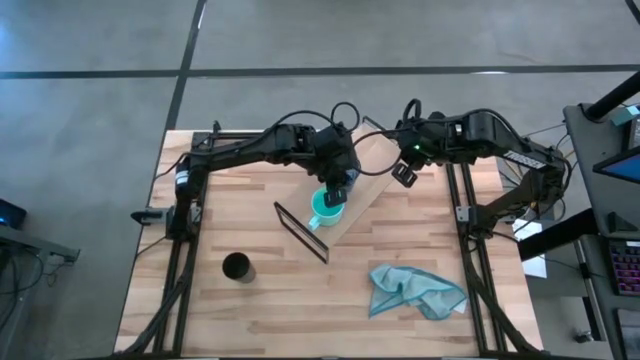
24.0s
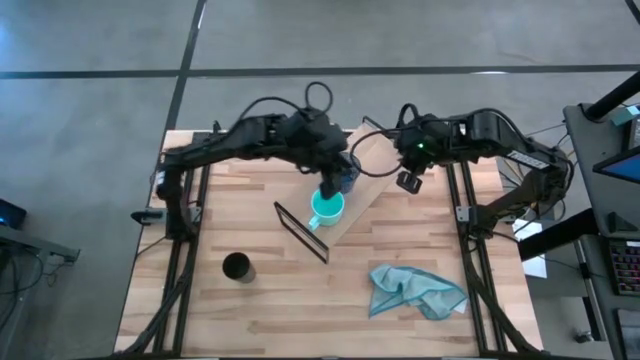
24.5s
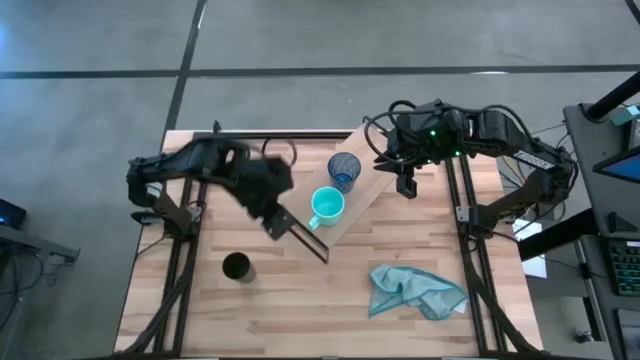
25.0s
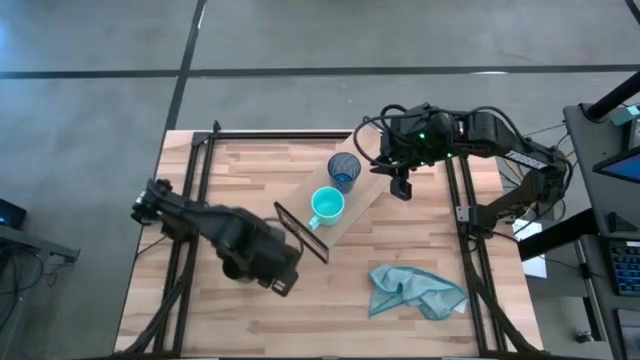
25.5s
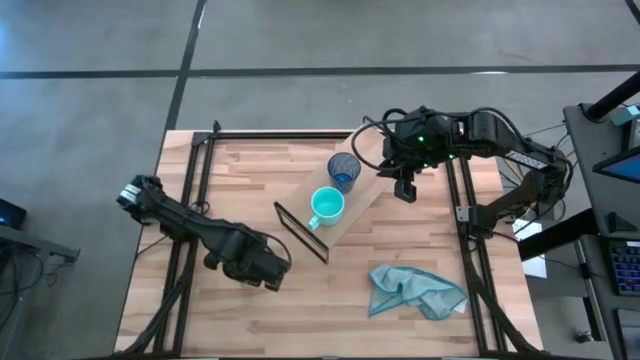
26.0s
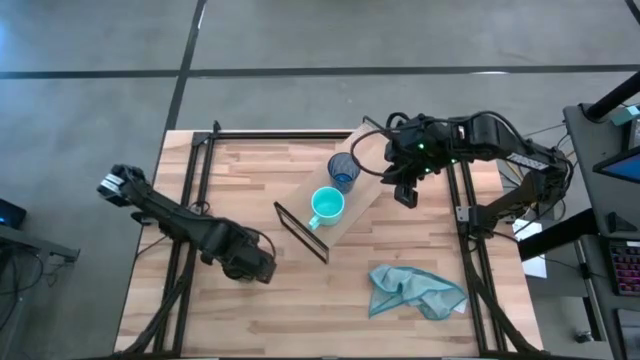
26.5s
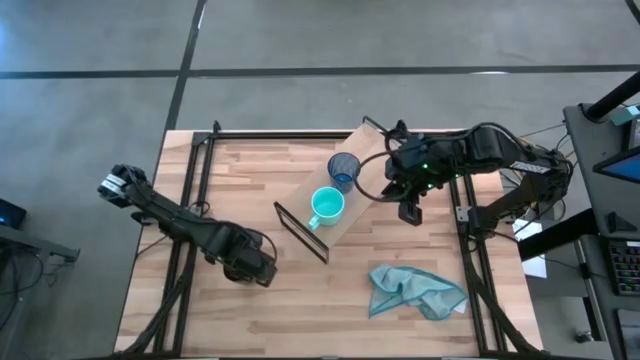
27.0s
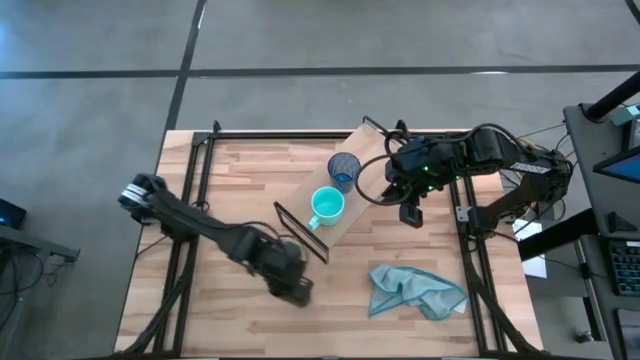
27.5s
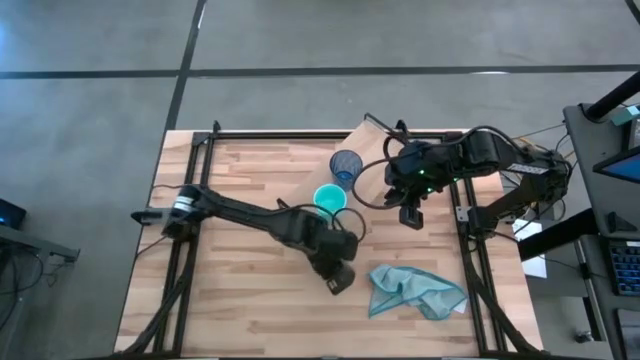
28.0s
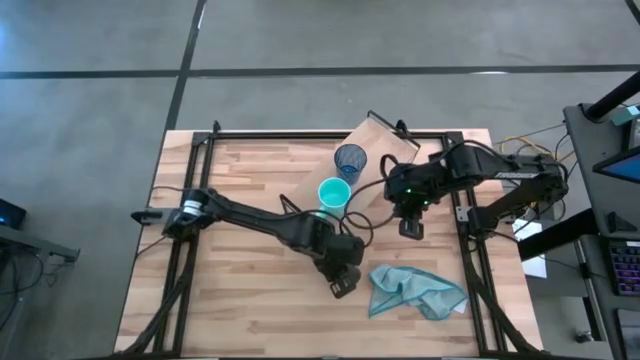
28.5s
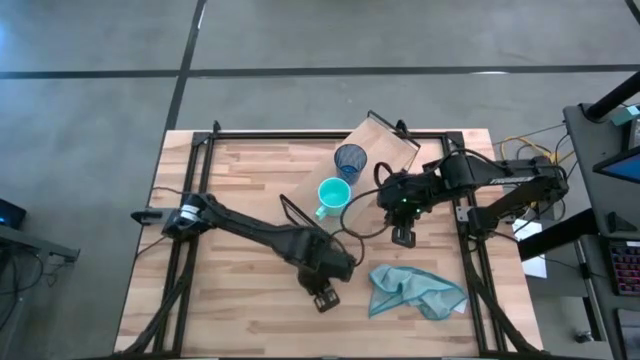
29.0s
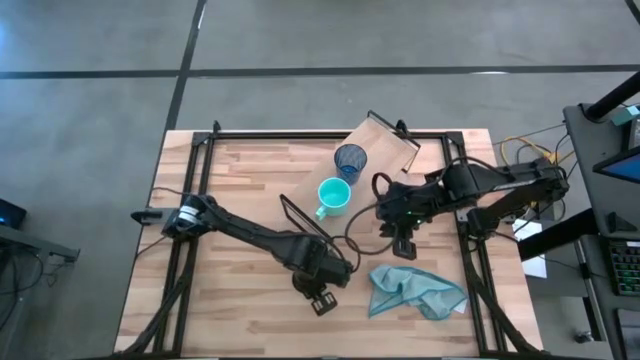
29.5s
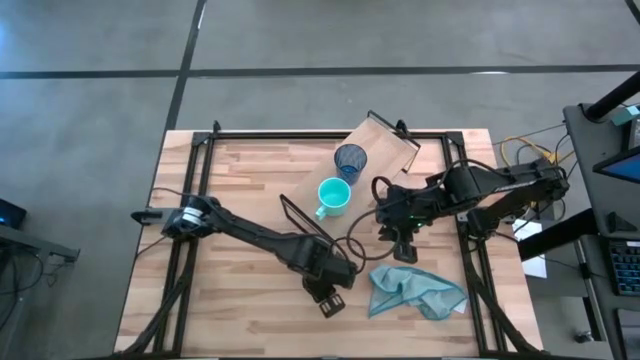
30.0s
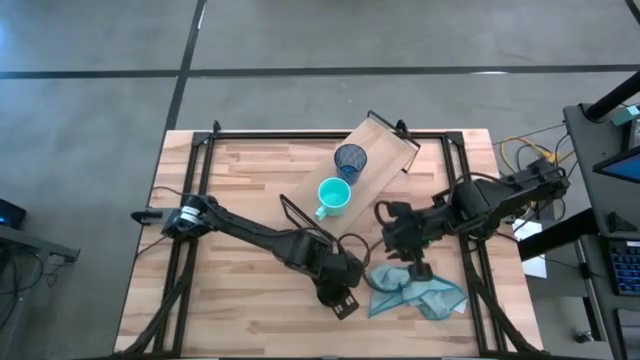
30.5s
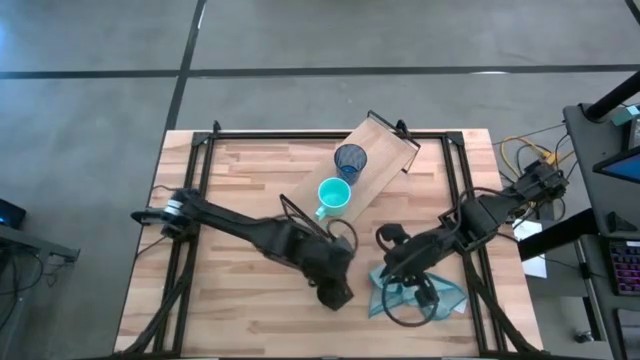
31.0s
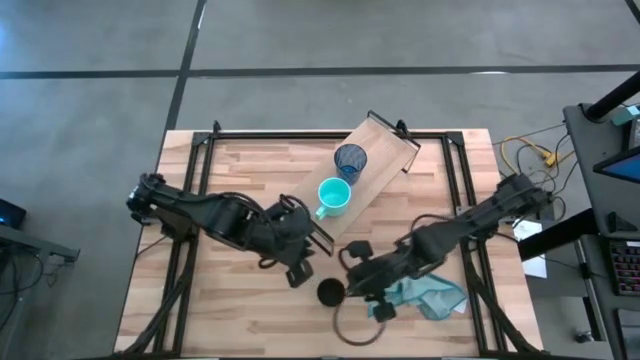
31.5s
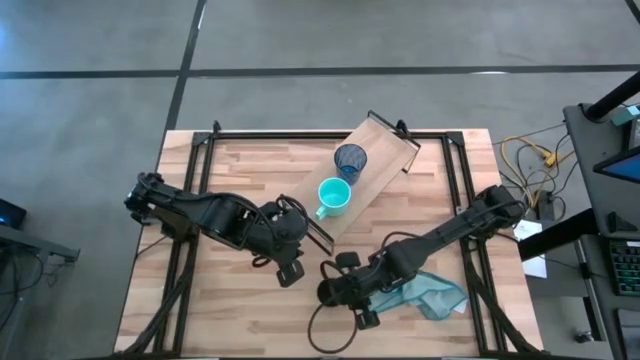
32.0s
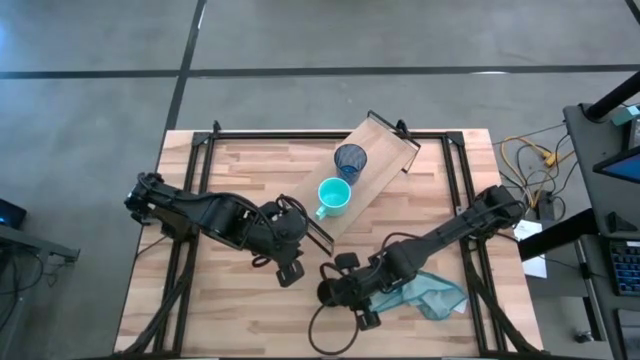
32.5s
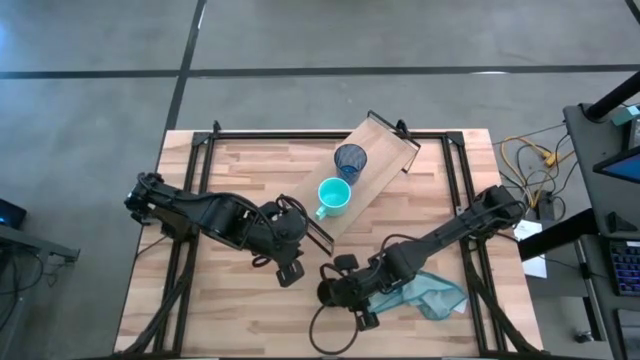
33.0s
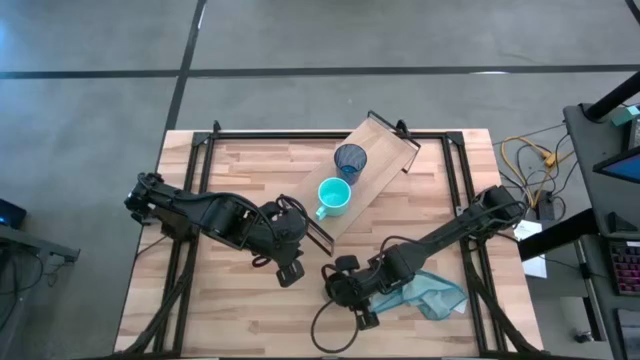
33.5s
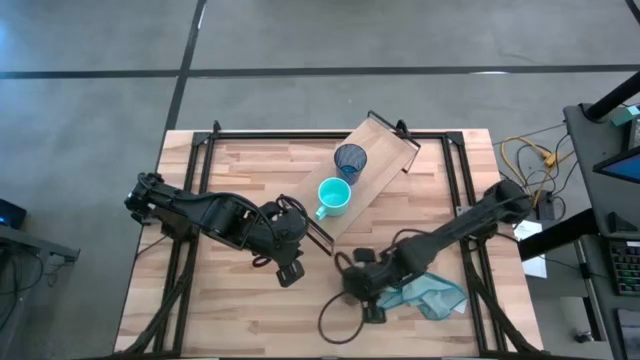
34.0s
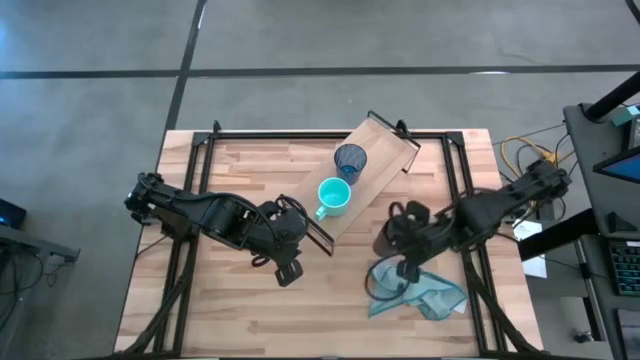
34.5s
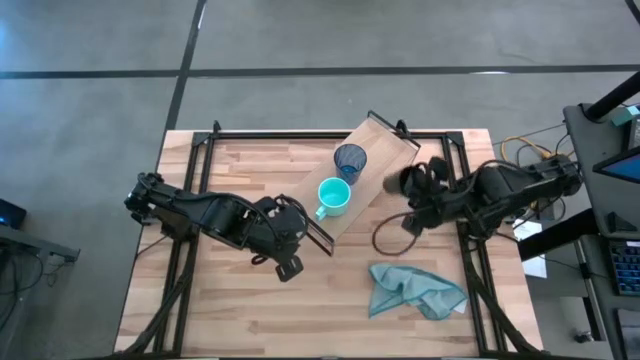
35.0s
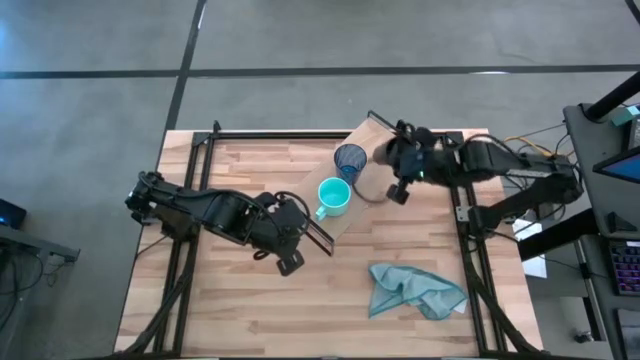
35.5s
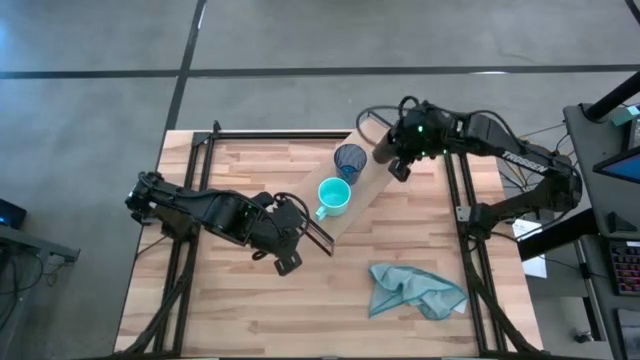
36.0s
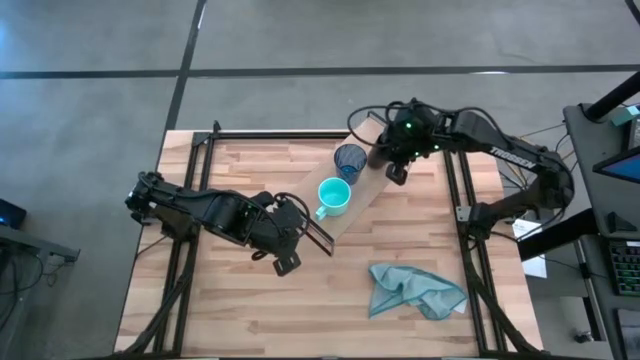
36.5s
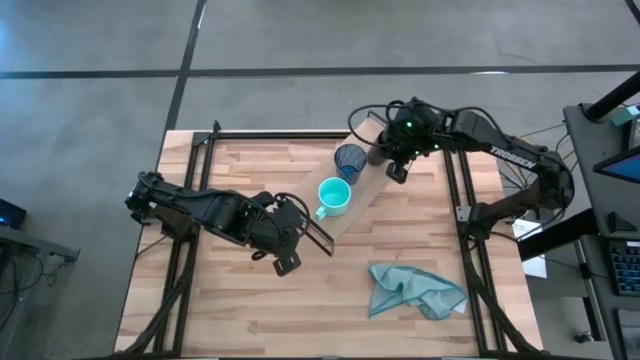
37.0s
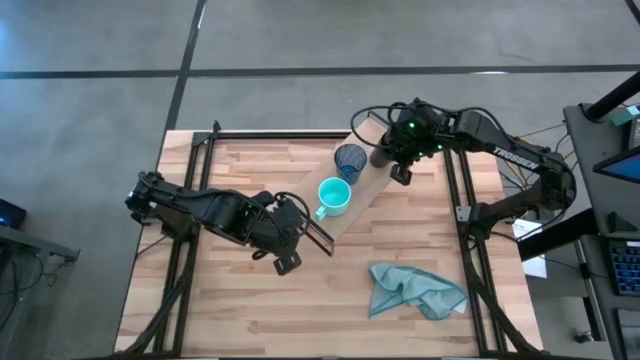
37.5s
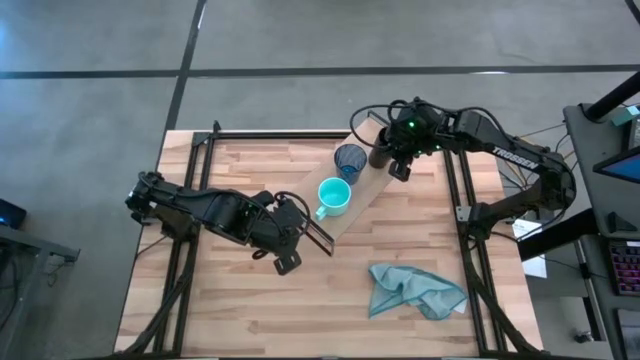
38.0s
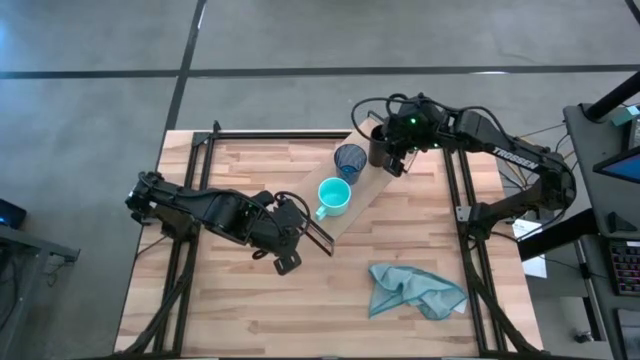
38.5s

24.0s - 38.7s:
Task: Stack small to large cups/mugs on shelf
Put the black cup on the shelf

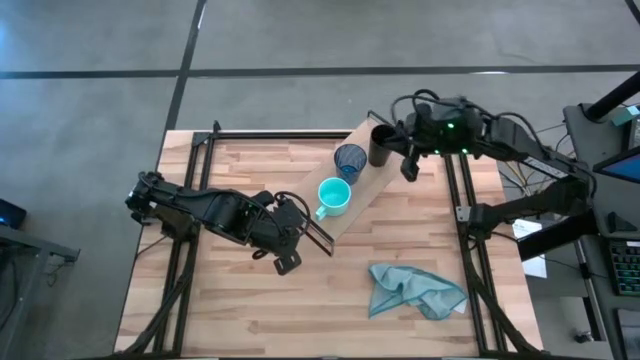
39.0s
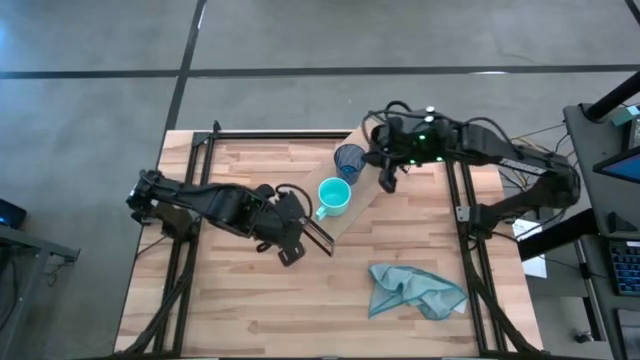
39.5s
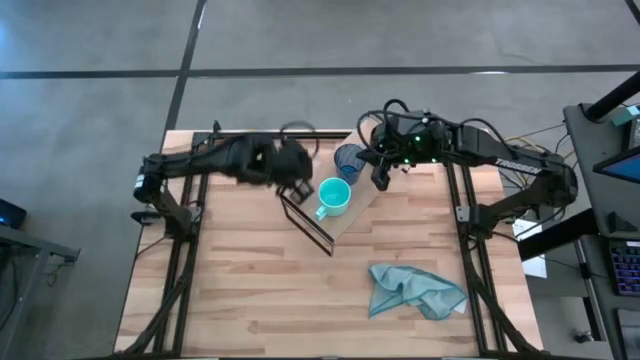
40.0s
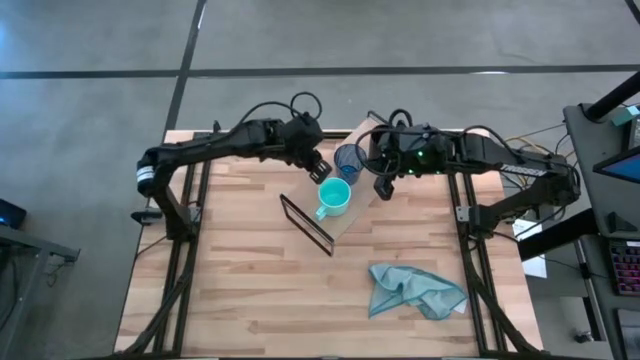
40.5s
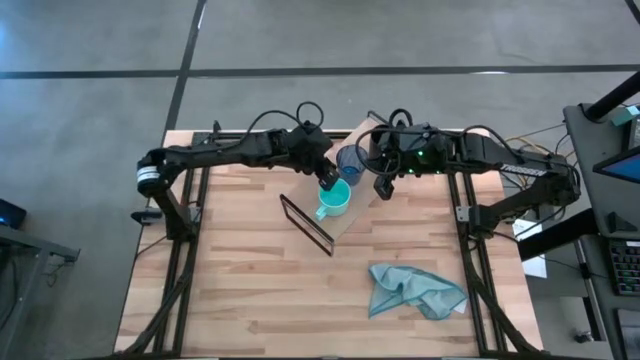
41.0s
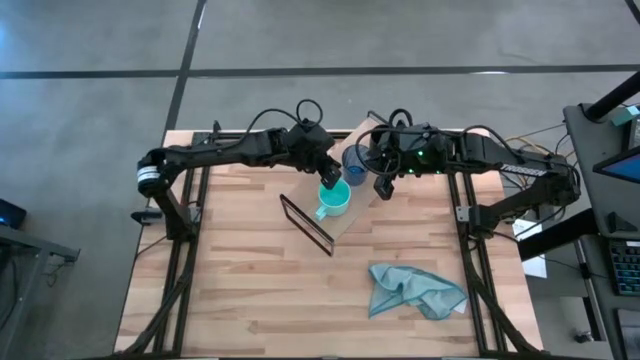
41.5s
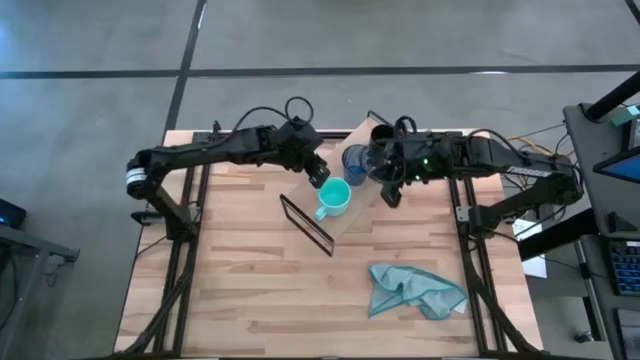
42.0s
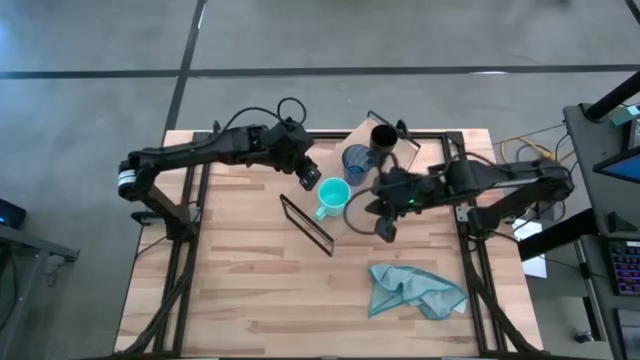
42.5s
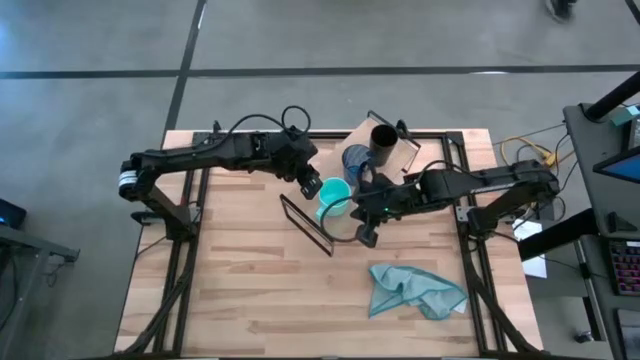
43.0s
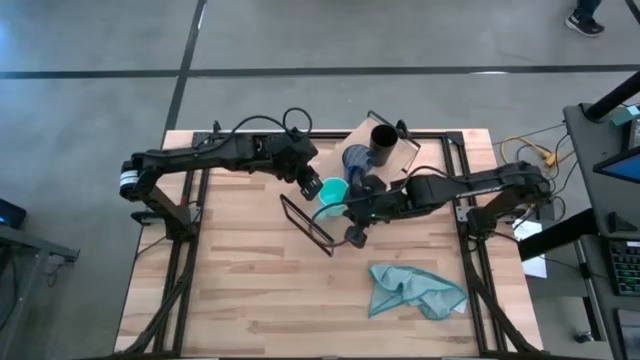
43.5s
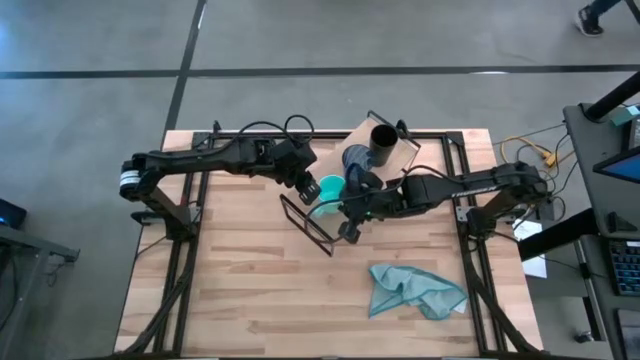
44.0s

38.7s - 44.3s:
Adjust the cup and mug on the shelf
